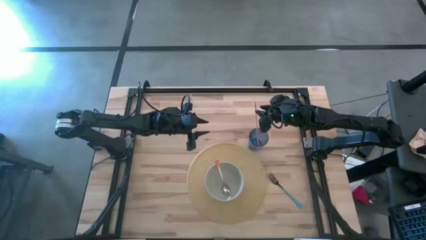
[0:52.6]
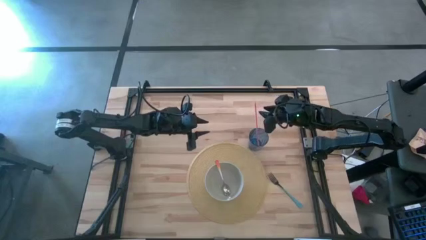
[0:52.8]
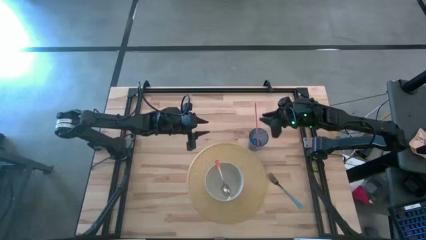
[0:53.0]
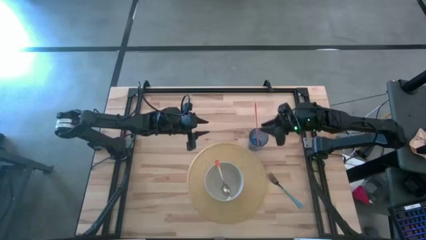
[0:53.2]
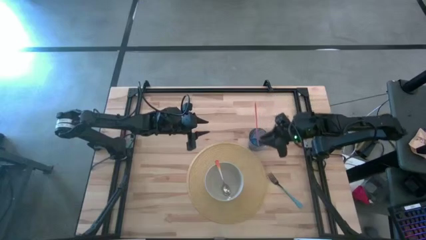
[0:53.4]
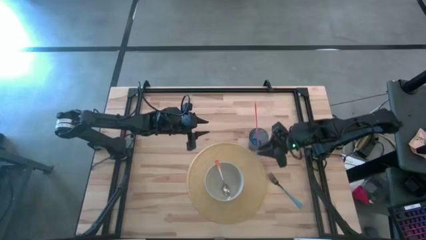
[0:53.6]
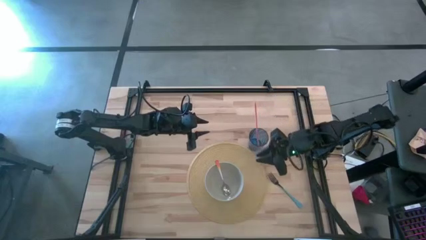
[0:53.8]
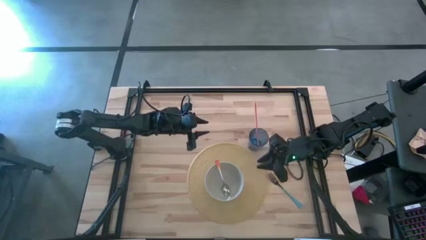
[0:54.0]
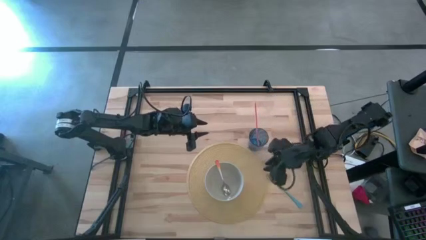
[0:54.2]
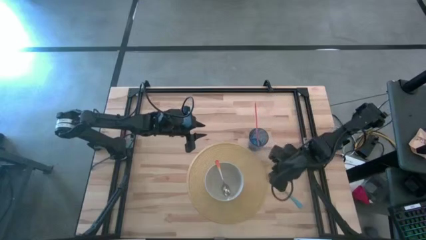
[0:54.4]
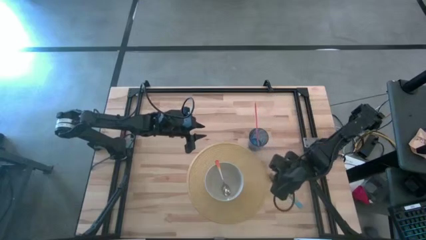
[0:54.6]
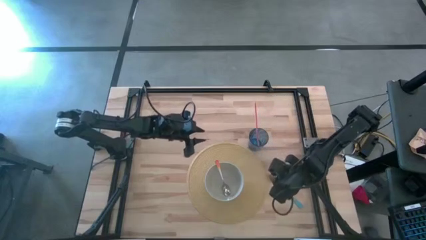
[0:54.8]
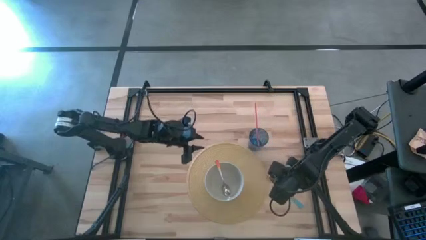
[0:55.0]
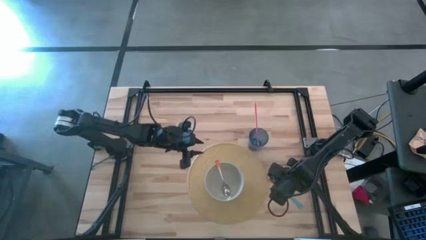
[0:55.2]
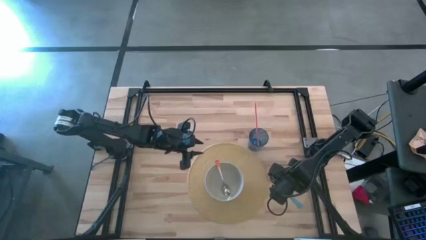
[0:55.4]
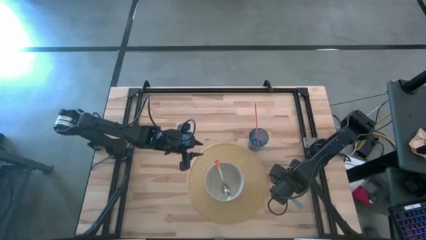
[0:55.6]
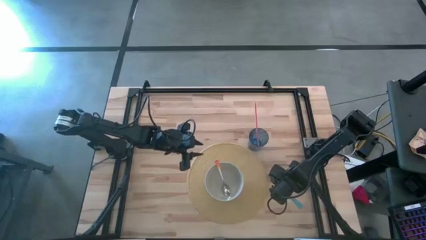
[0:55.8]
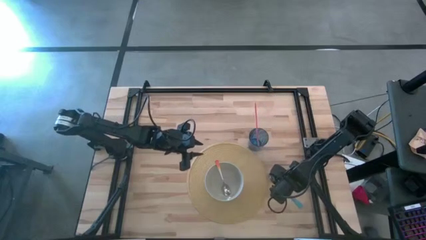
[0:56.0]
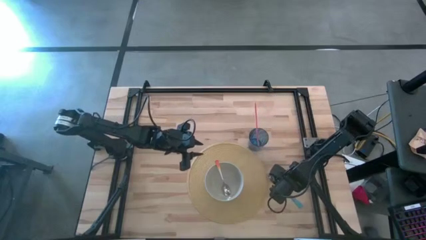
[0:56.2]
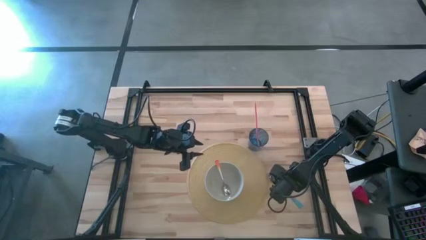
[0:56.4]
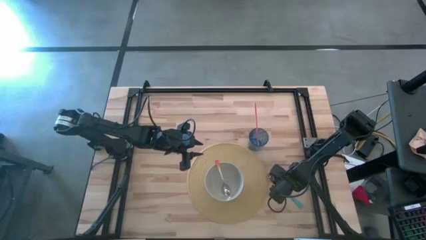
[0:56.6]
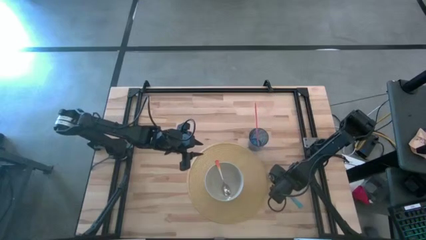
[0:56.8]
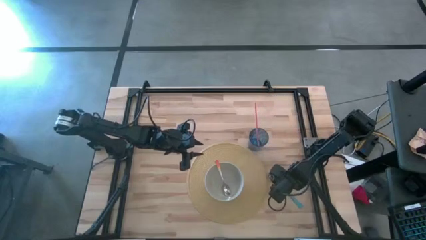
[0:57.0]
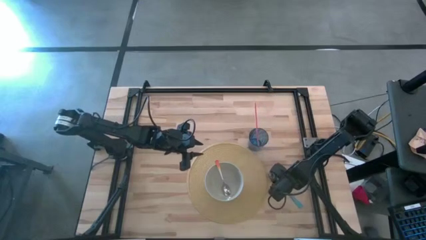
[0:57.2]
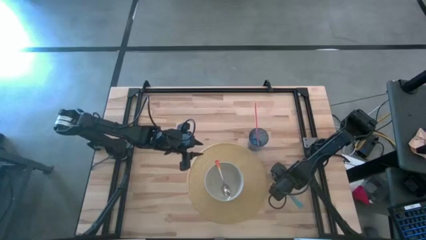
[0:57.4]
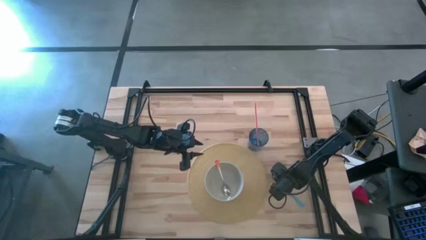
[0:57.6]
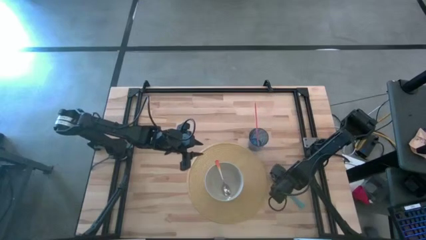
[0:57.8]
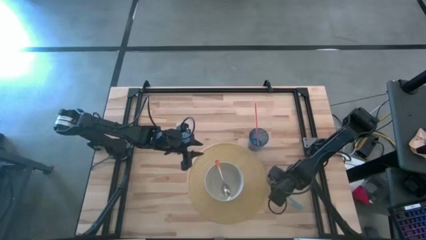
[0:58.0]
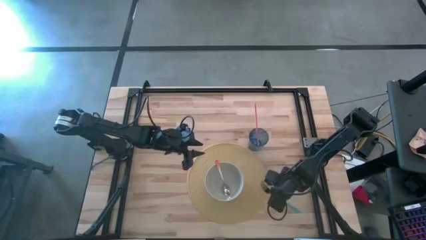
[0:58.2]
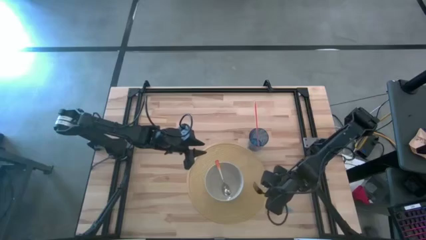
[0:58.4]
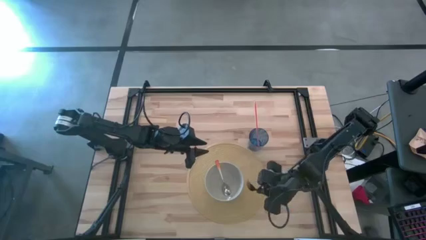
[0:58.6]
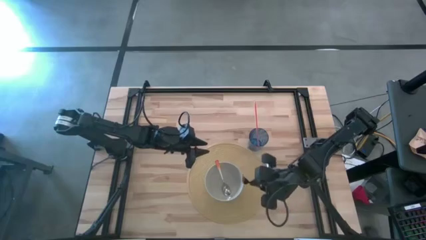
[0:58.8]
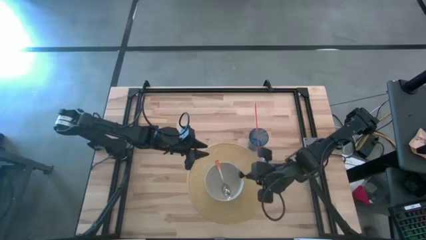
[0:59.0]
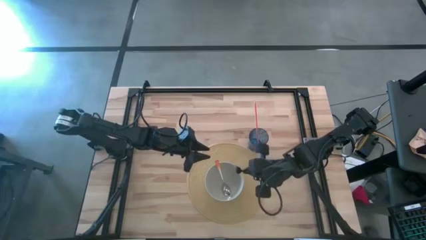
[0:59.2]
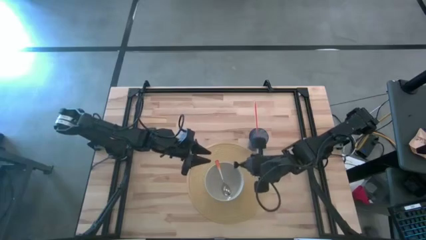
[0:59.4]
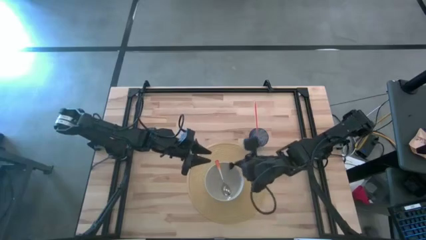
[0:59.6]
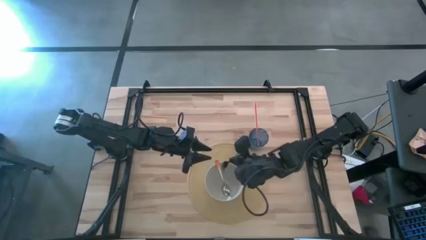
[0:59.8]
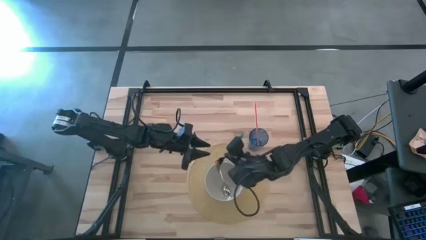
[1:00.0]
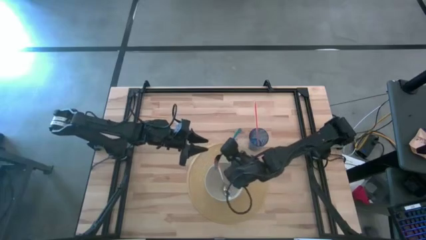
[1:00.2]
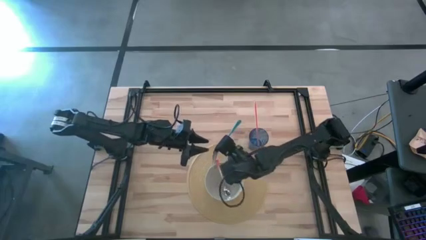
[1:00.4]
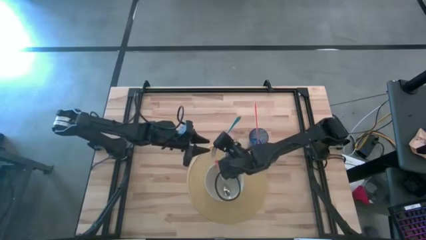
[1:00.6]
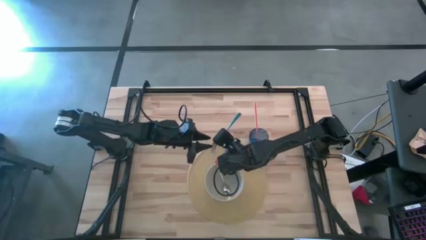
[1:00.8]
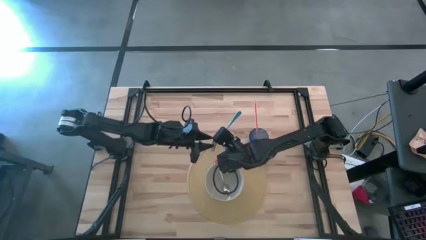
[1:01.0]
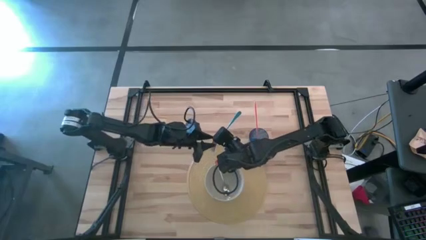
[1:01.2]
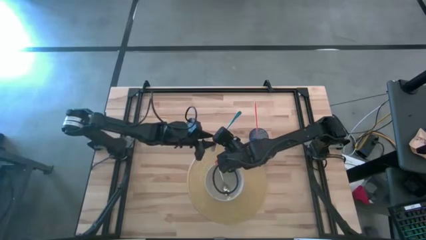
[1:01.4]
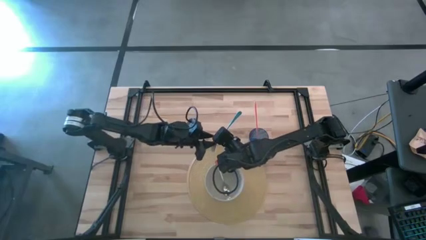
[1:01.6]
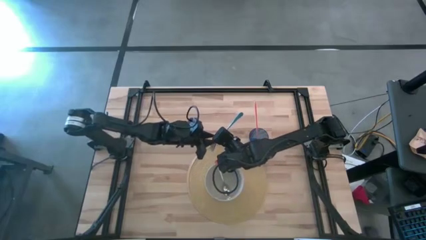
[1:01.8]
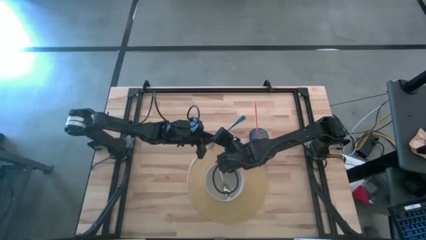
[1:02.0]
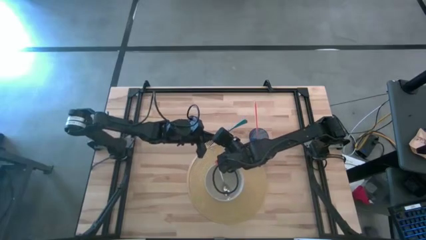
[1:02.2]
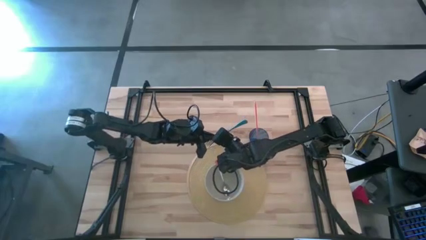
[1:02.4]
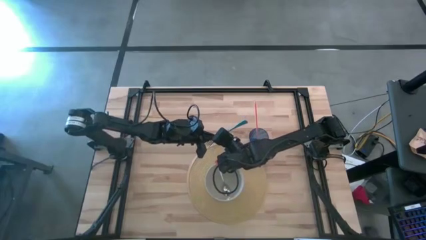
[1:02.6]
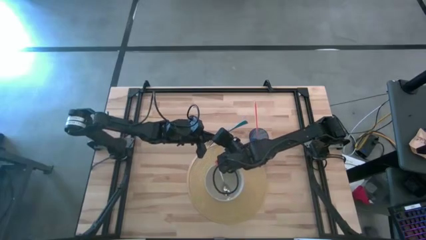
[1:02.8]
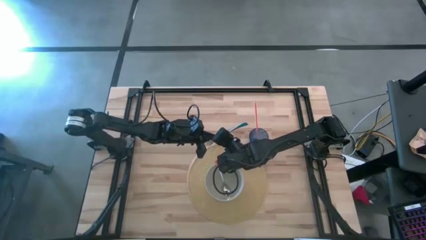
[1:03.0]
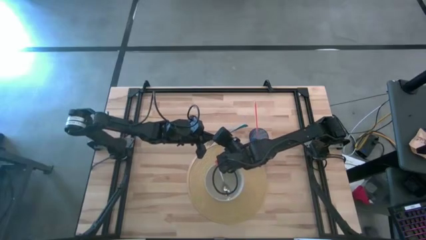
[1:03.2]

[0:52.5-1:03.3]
Task: Pick & Place Utensil
Put the orange spoon into the white bowl on the brown placemat

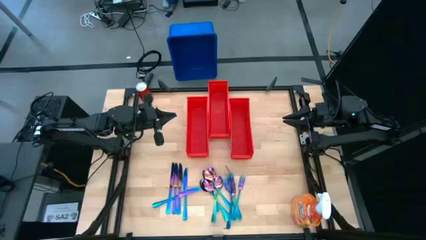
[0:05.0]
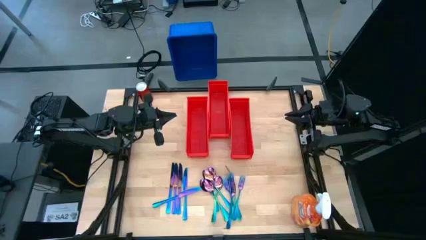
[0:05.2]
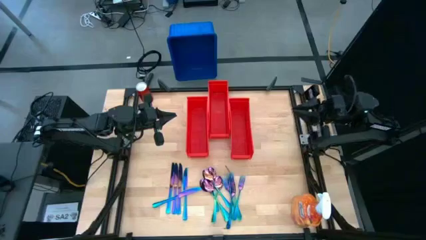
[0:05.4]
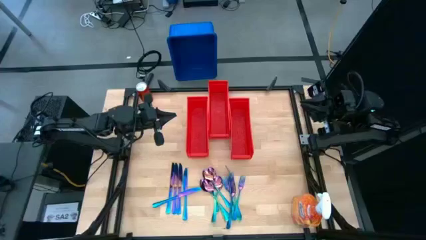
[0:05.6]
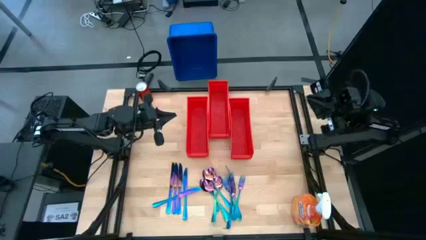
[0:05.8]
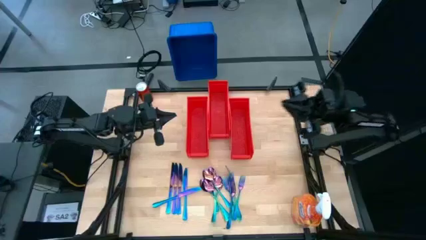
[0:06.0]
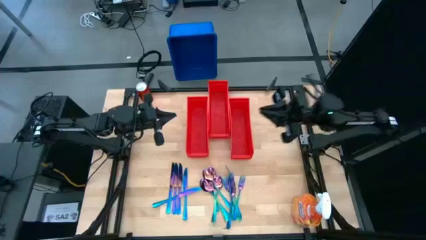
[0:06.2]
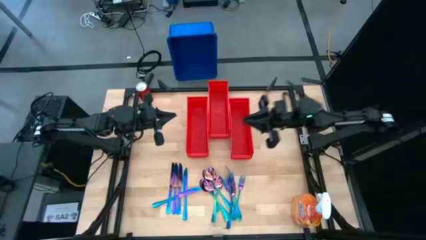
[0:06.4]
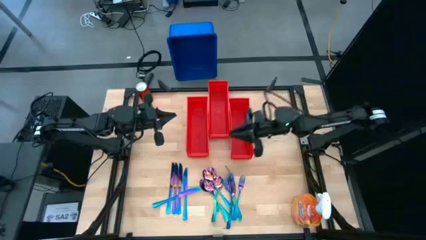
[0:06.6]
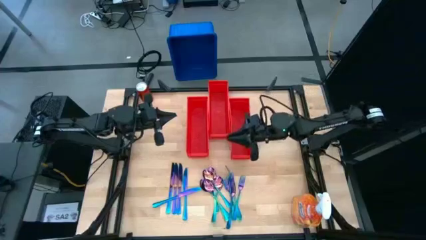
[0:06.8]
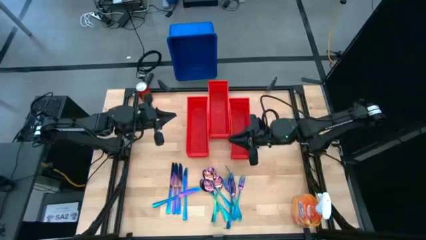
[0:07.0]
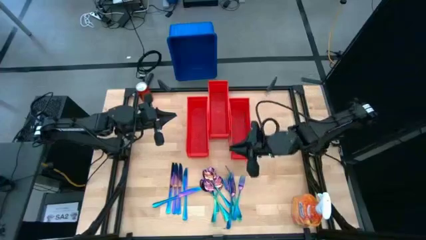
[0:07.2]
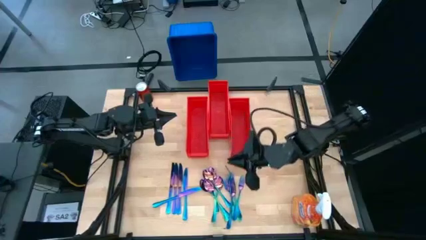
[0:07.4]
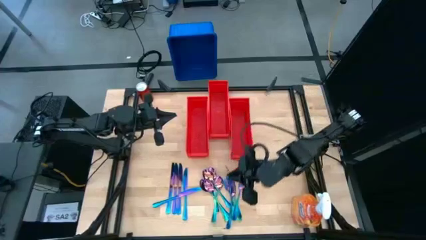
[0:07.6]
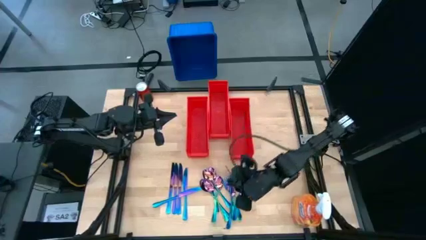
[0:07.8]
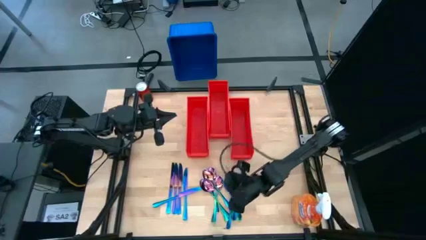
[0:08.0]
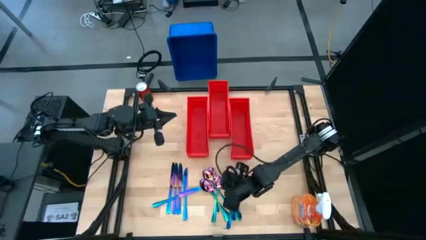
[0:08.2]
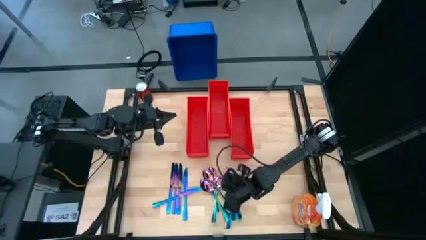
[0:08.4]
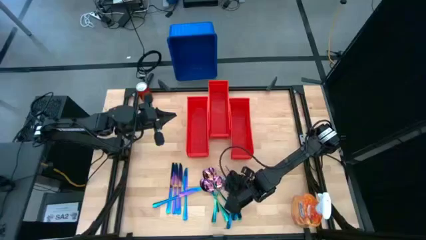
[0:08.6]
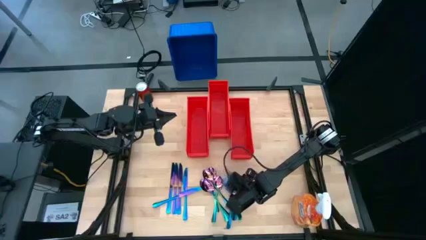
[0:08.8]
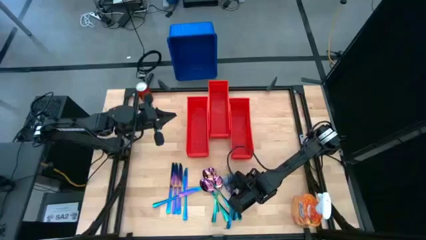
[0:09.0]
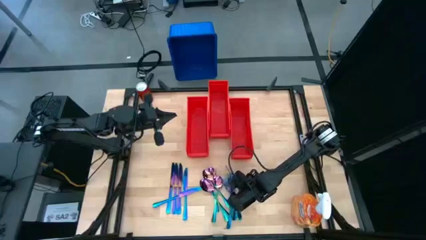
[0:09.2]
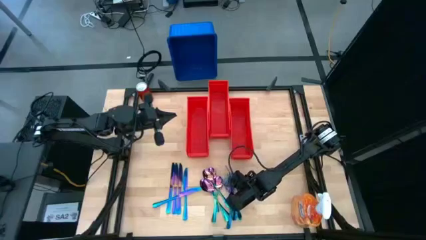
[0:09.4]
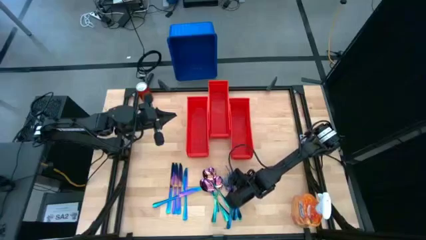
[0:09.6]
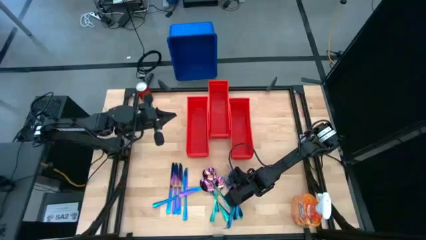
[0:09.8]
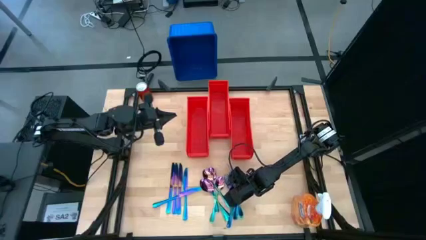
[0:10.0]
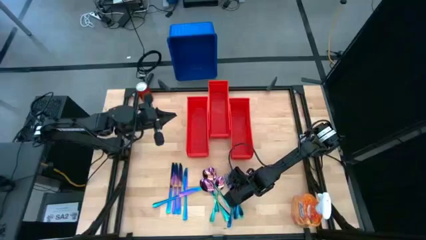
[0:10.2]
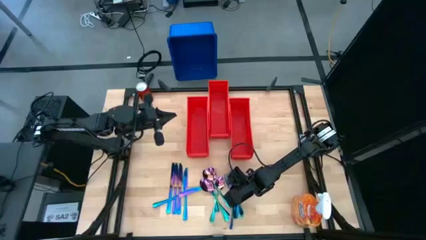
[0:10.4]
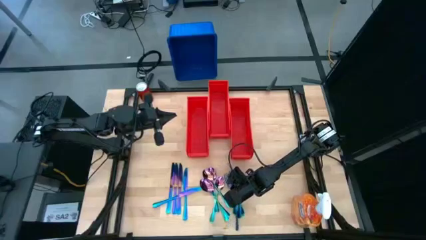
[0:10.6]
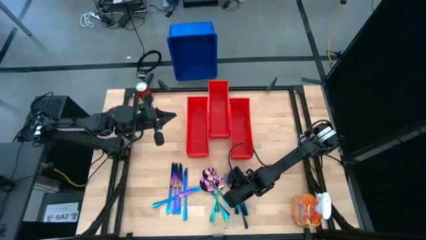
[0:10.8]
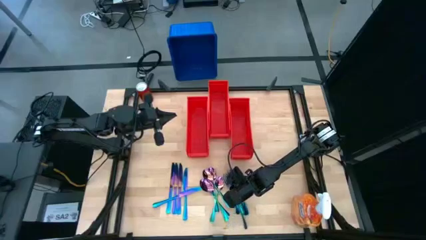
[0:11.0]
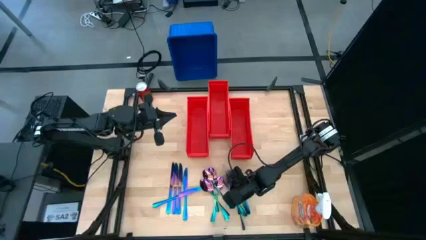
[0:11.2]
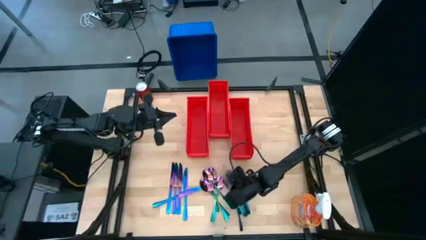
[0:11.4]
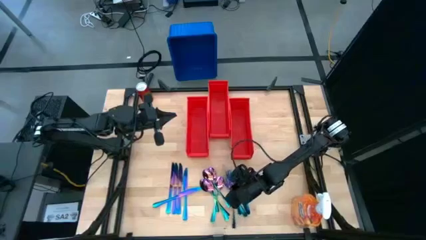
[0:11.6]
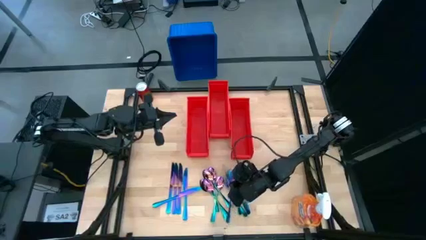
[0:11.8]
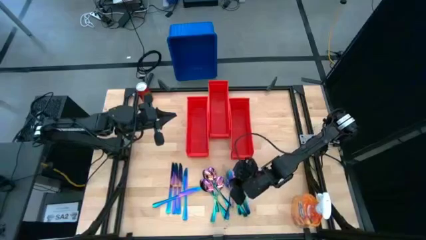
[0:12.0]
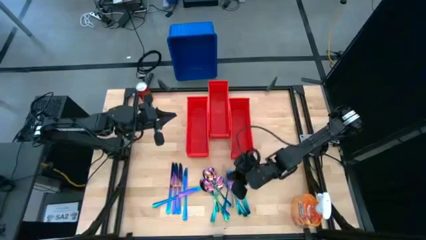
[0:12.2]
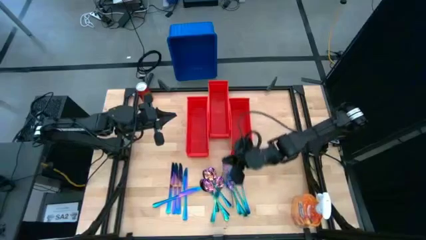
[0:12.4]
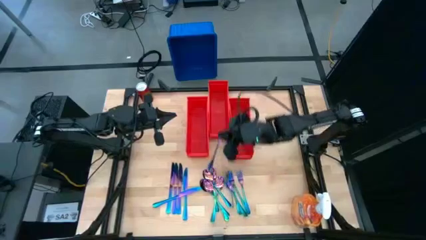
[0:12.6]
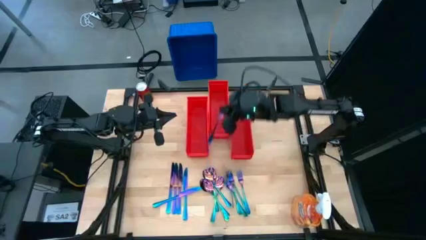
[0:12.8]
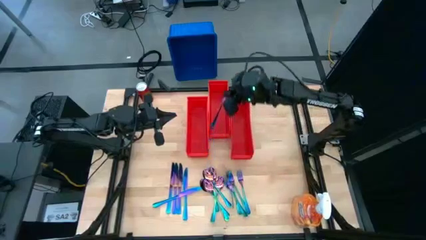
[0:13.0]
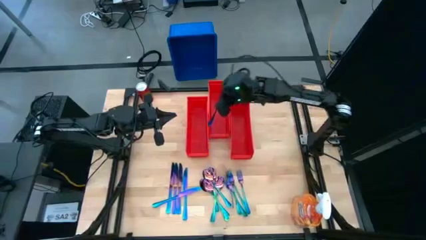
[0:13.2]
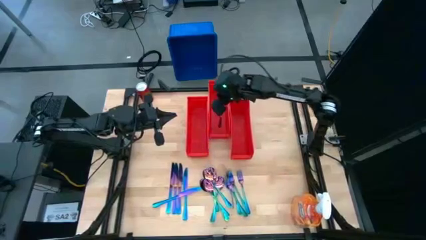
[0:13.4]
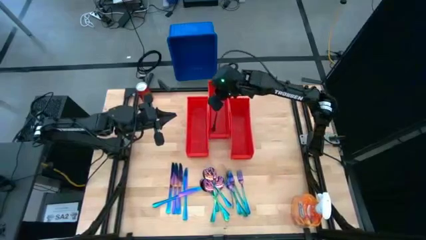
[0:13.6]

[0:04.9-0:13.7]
Task: Sort silverware
Put the iridescent fork into the middle orange bin
